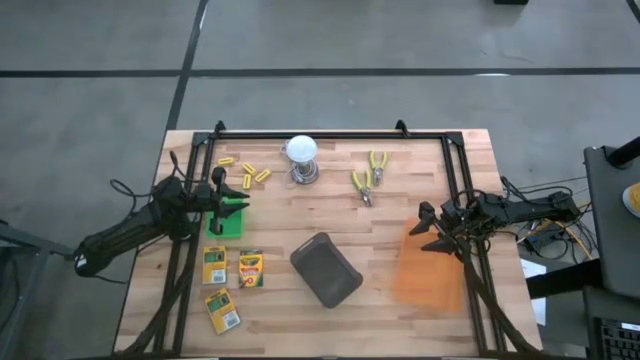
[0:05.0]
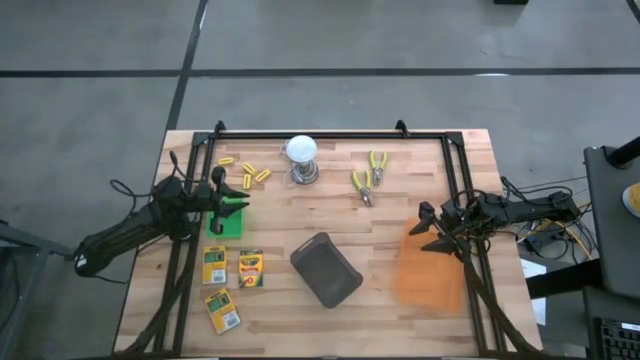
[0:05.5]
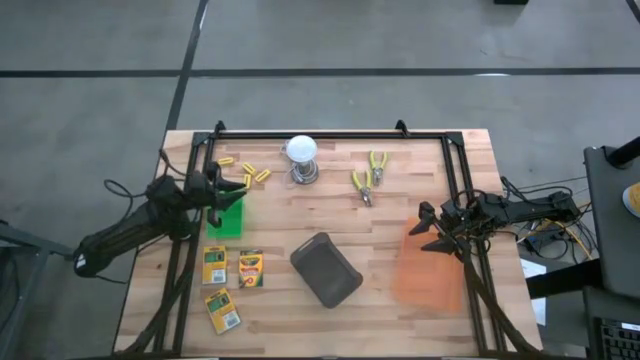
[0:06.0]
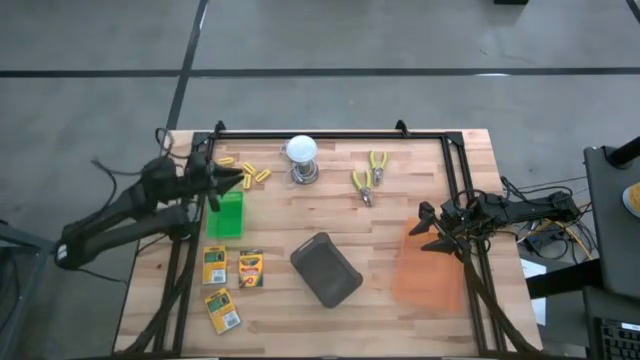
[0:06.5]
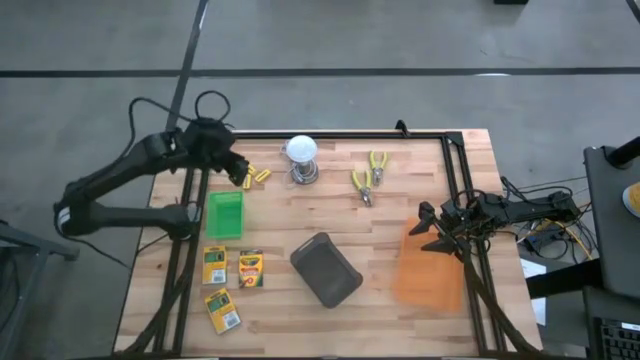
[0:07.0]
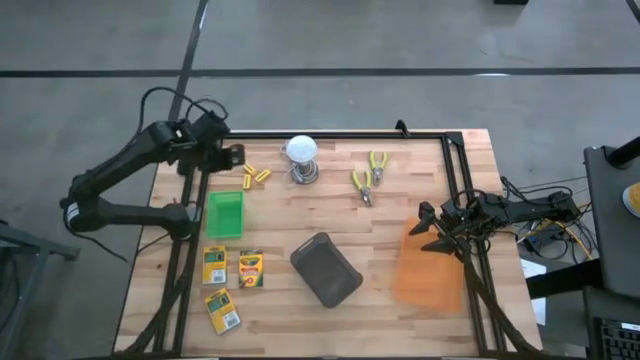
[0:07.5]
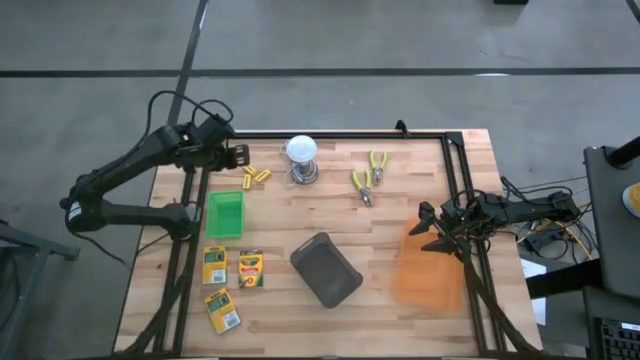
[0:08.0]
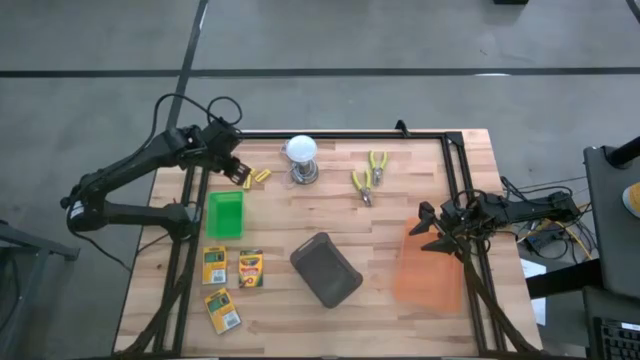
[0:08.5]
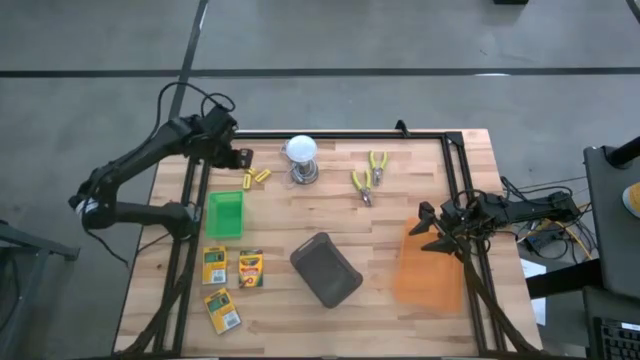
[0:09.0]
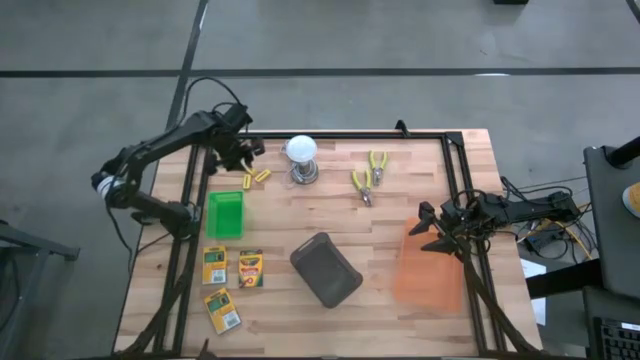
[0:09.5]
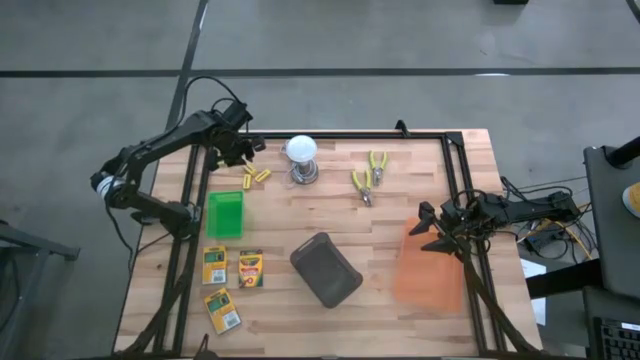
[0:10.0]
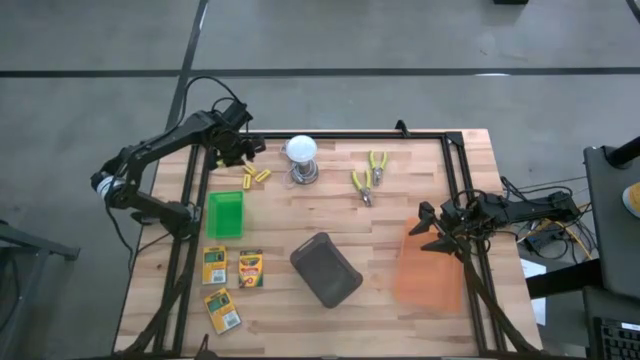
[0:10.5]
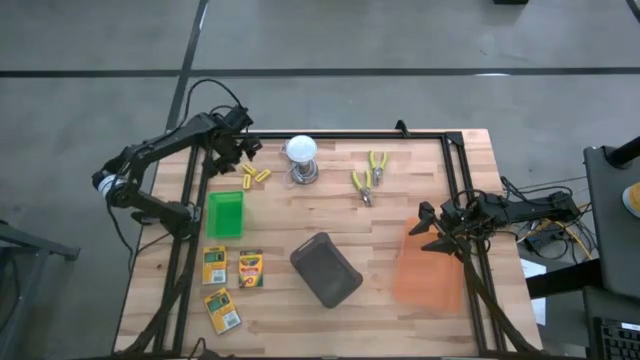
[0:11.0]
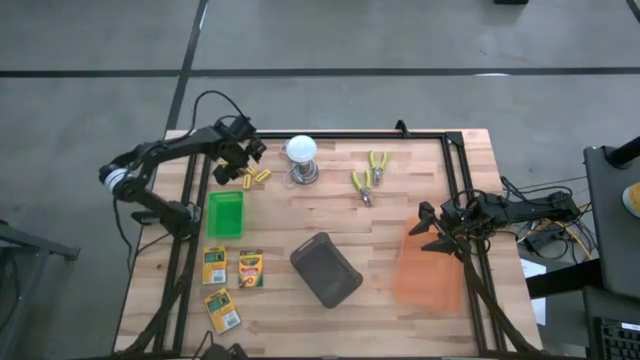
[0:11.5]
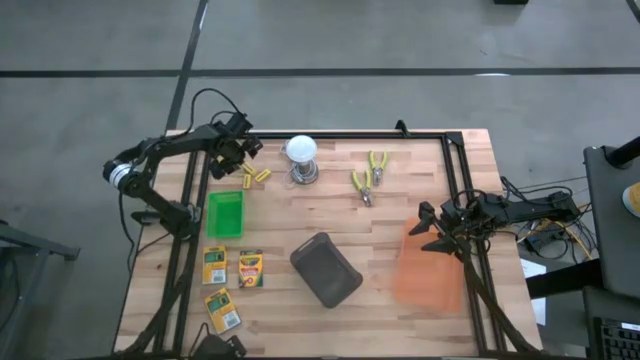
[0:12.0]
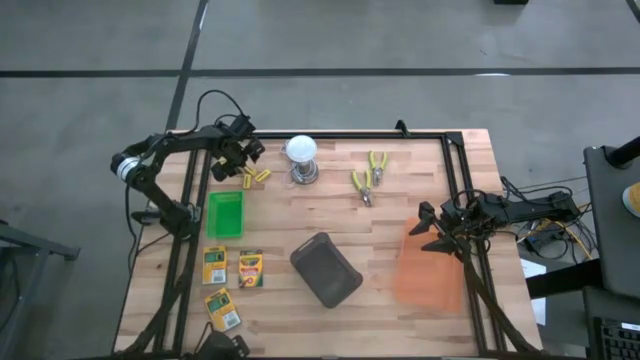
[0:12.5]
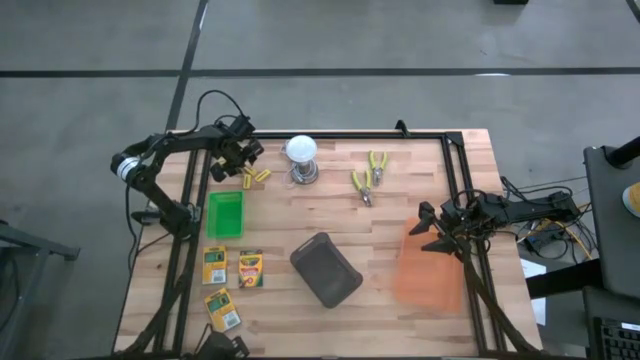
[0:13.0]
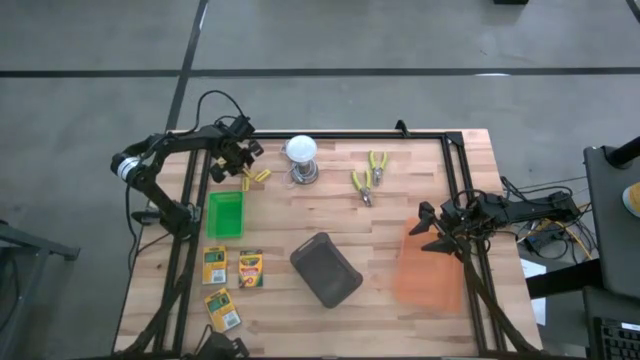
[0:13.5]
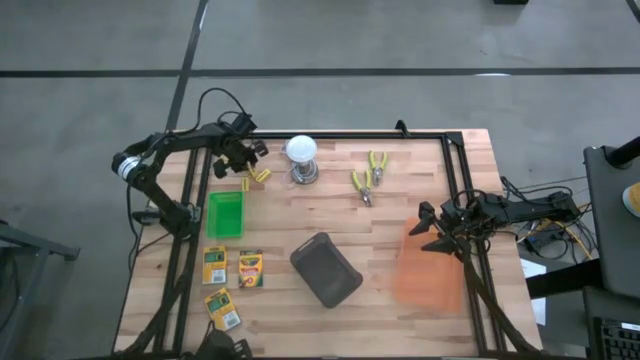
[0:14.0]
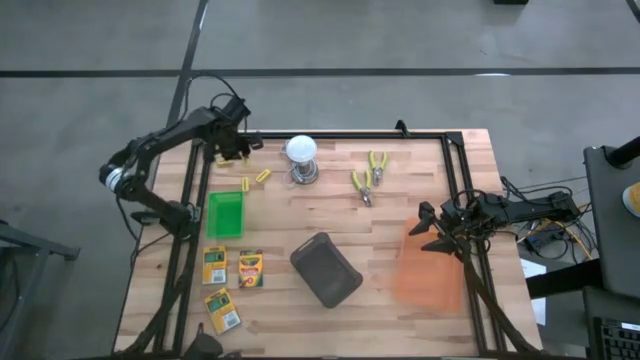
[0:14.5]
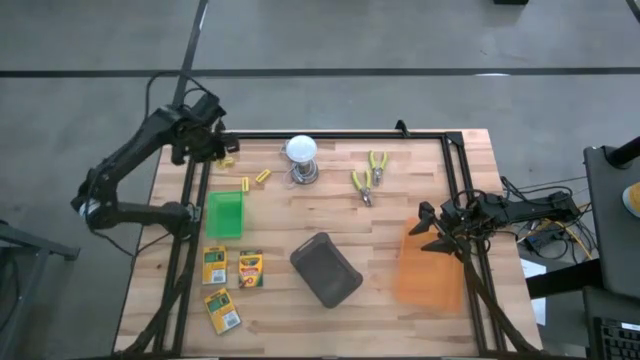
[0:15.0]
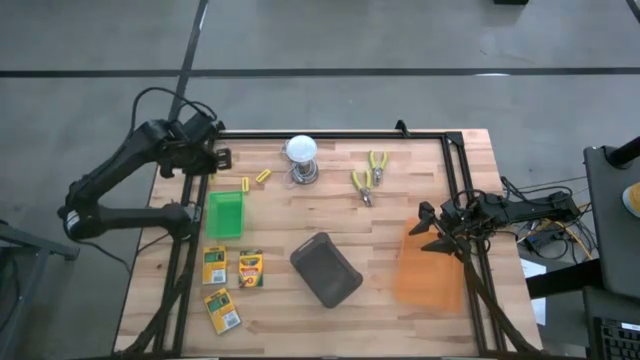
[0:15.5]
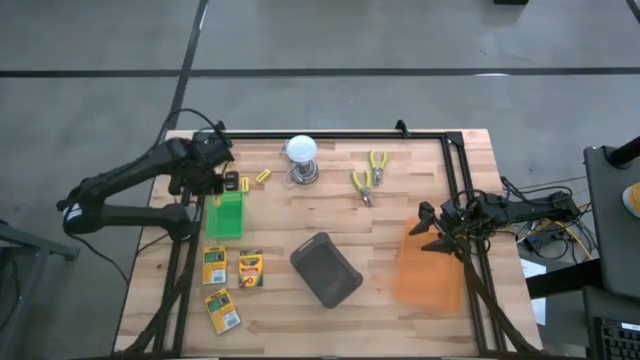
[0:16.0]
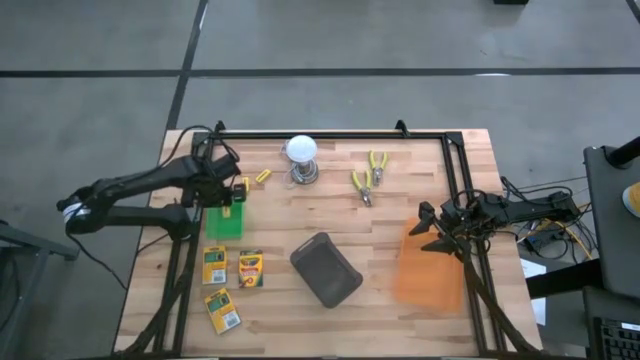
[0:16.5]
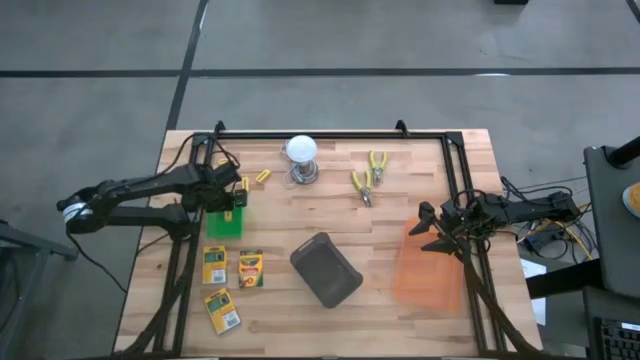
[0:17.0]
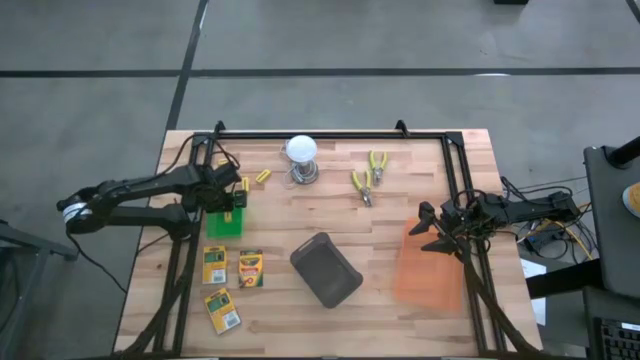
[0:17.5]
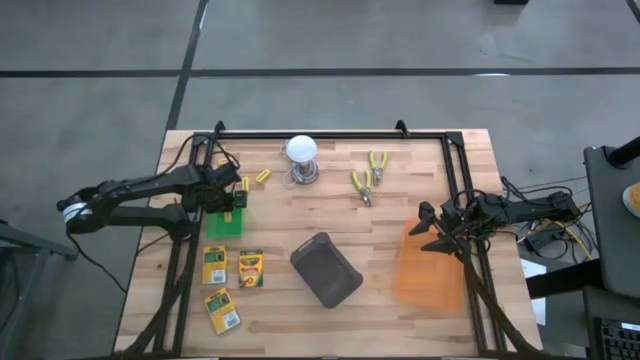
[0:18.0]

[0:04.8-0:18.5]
Task: Pick & Place School Supplies
Put the yellow eraser into the green bin

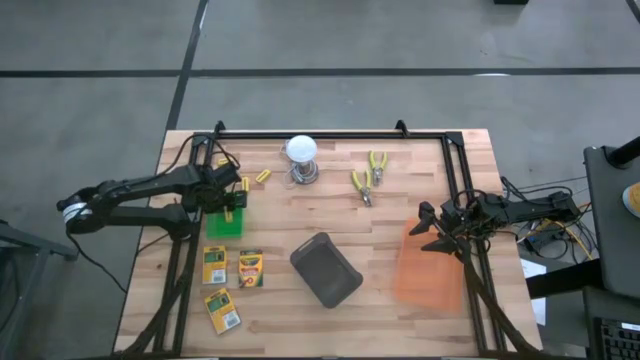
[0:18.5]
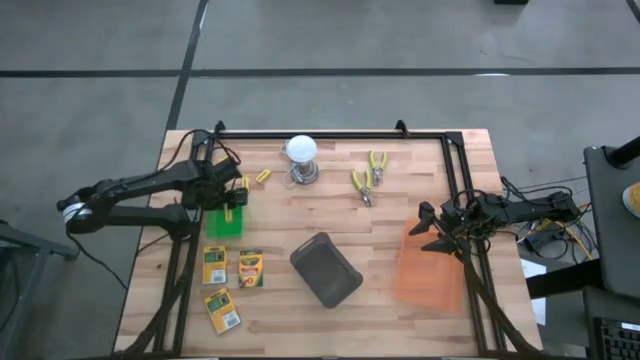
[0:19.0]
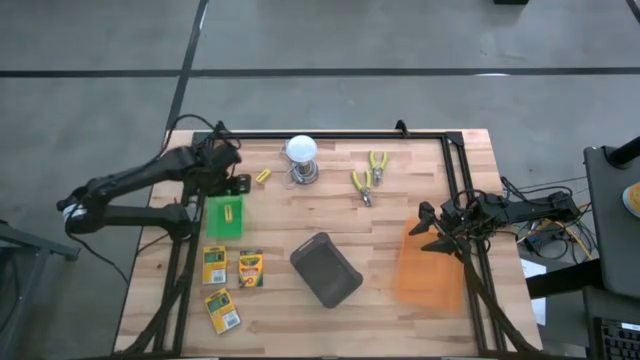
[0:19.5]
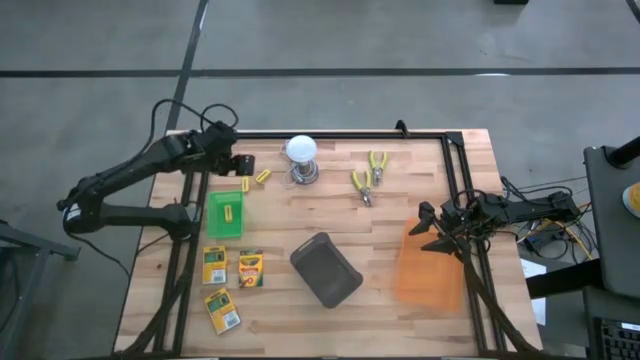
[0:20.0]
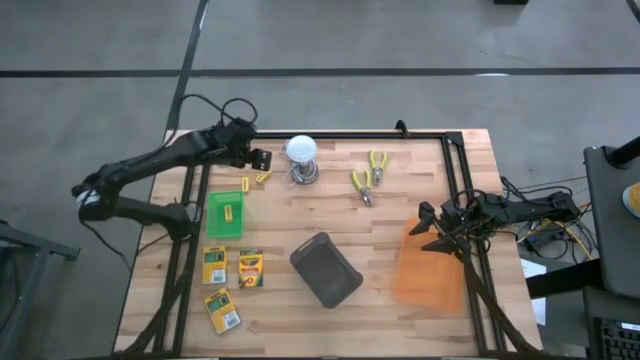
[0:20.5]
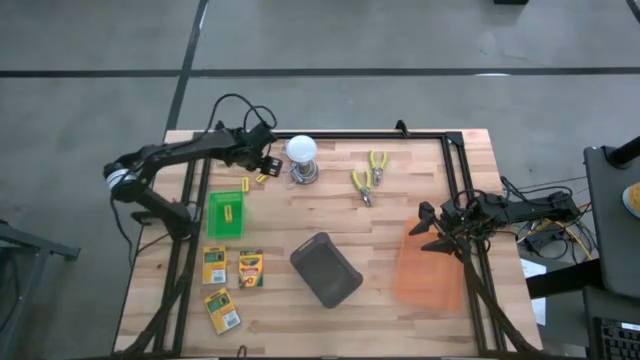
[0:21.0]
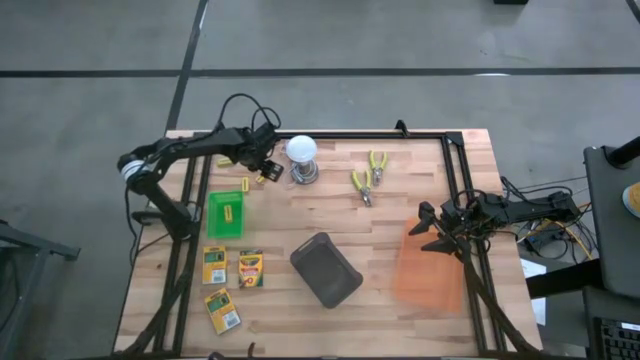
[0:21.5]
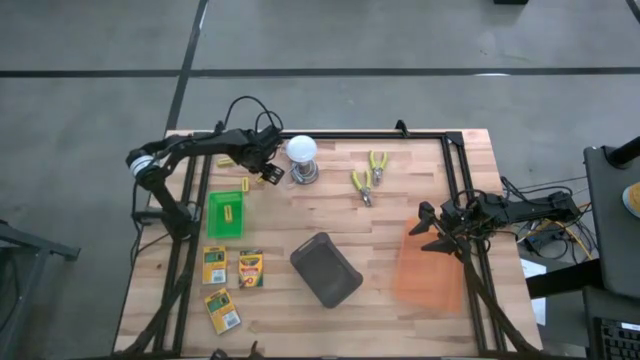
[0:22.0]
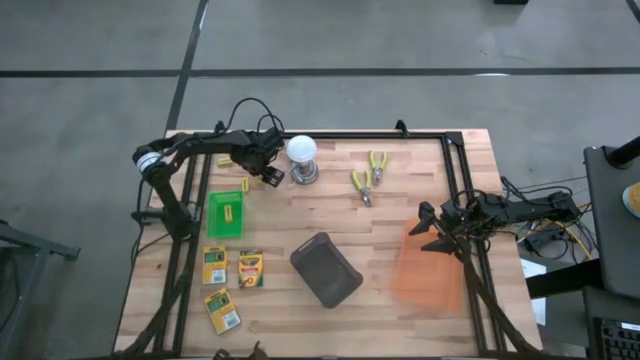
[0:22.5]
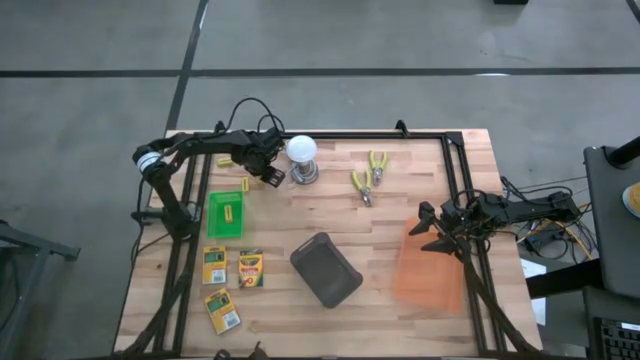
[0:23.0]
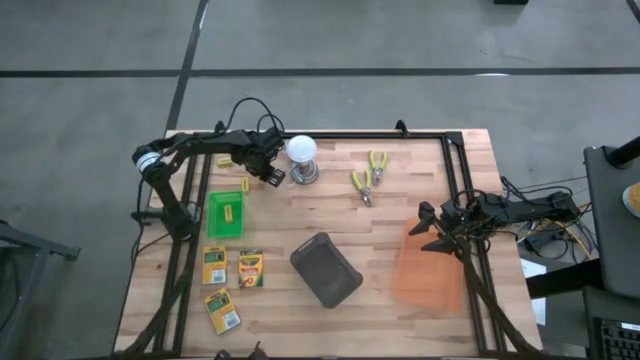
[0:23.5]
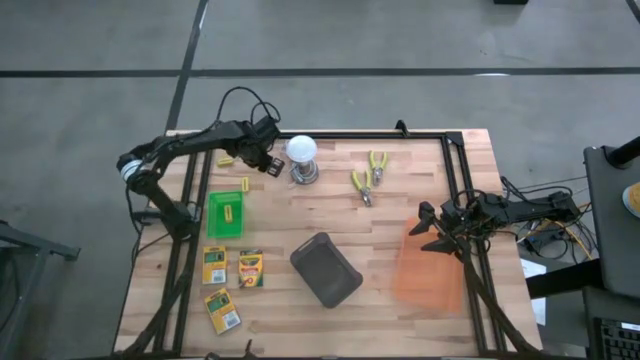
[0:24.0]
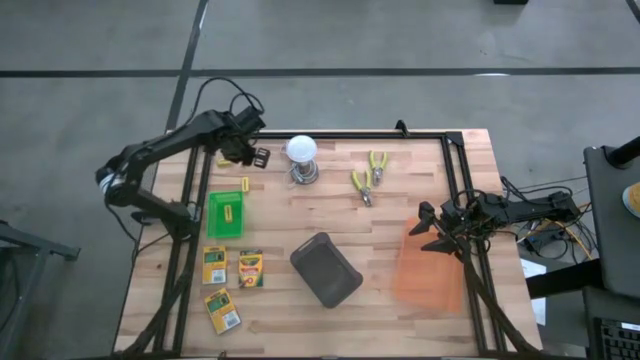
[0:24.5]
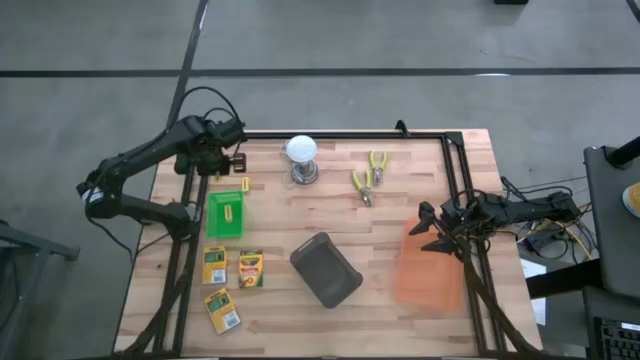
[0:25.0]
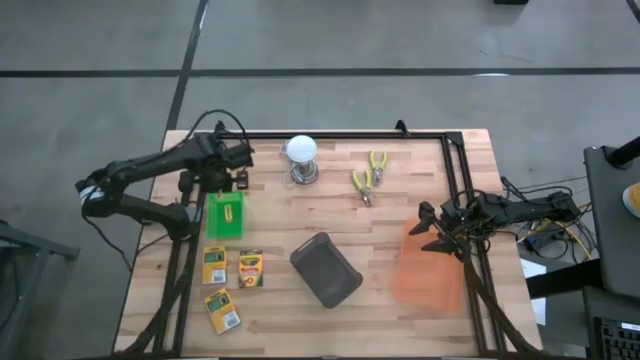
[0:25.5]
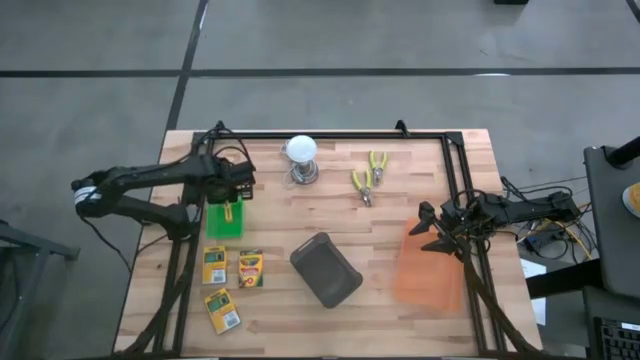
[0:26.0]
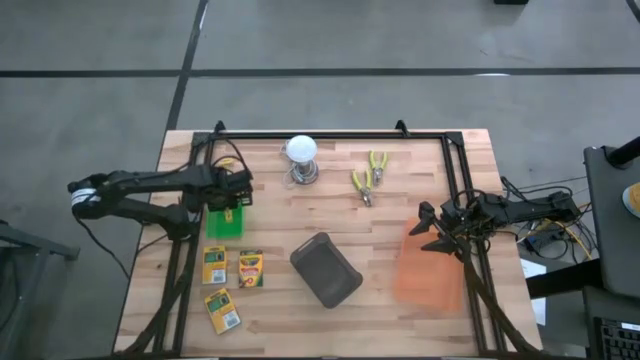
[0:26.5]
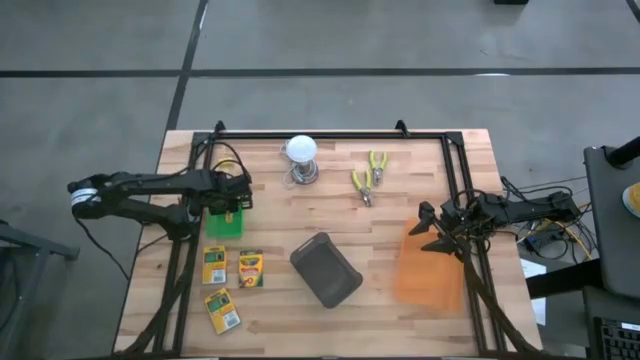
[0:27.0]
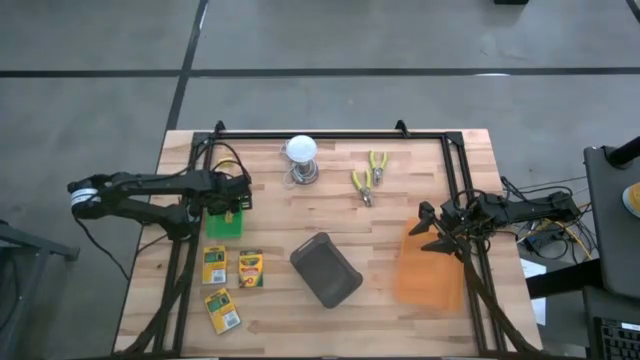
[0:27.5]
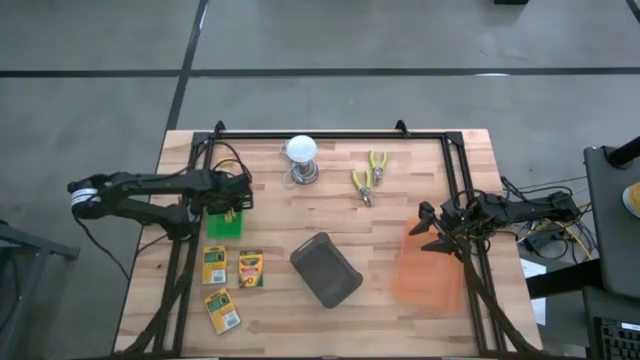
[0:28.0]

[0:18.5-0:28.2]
Put the yellow eraser into the green bin
